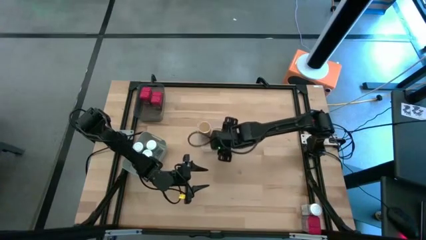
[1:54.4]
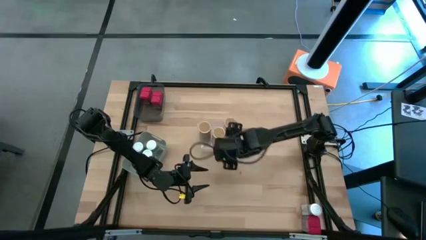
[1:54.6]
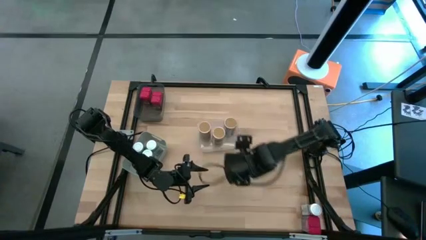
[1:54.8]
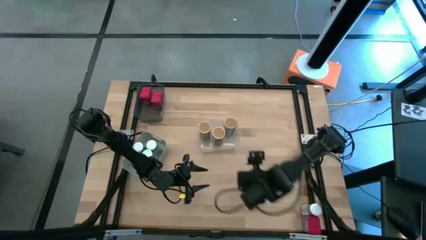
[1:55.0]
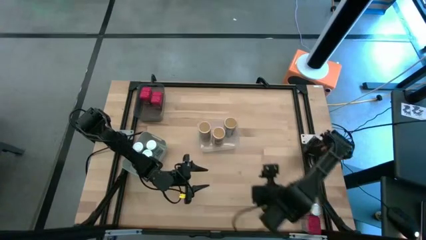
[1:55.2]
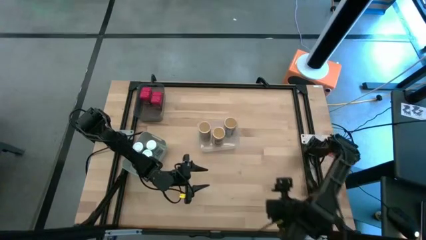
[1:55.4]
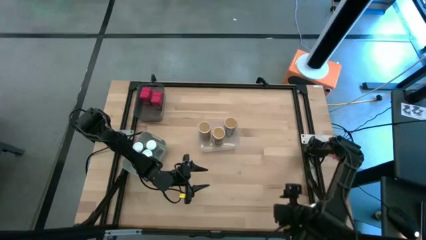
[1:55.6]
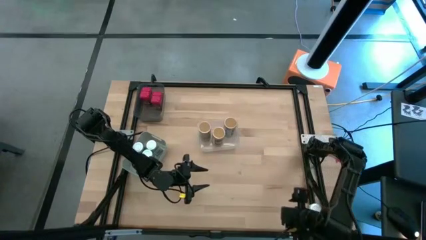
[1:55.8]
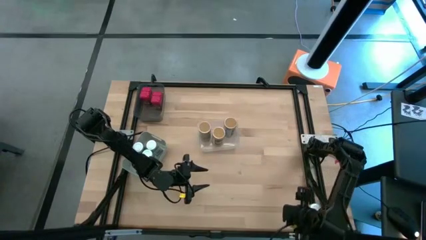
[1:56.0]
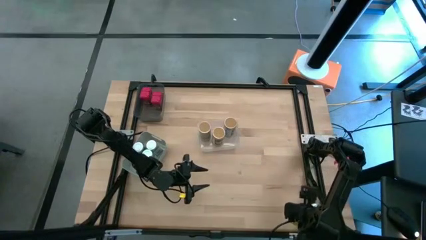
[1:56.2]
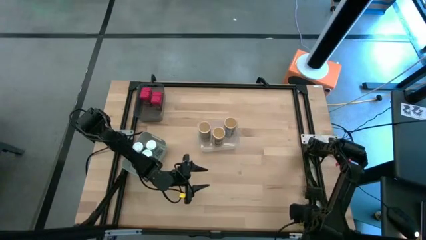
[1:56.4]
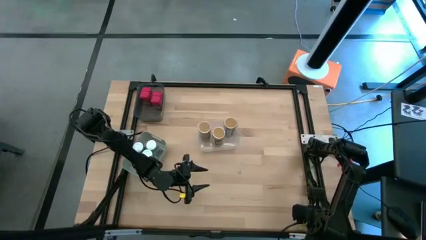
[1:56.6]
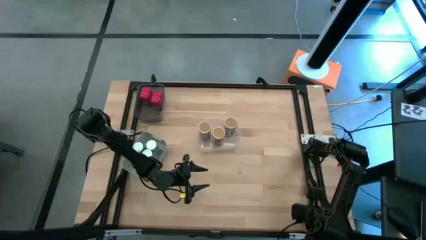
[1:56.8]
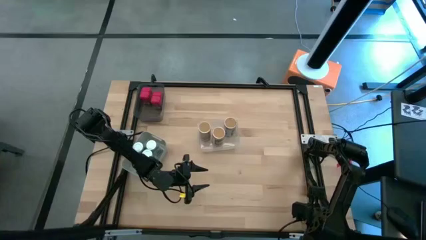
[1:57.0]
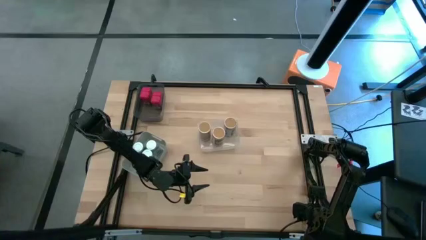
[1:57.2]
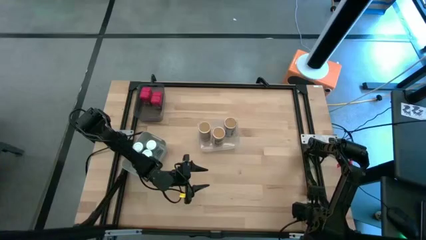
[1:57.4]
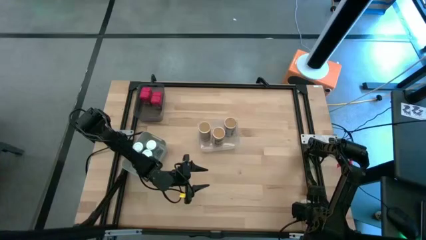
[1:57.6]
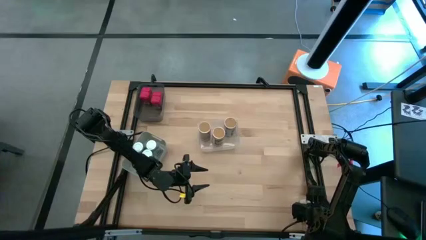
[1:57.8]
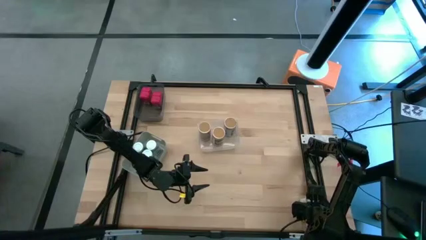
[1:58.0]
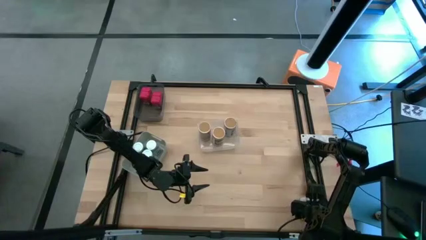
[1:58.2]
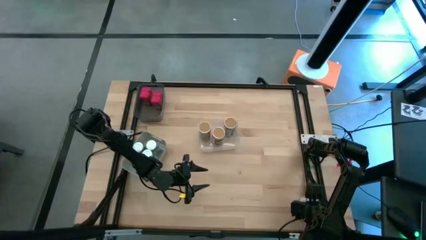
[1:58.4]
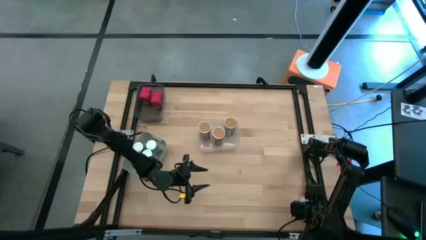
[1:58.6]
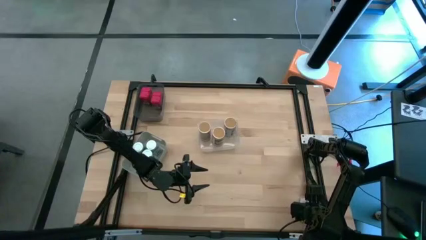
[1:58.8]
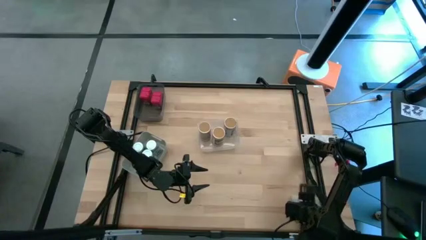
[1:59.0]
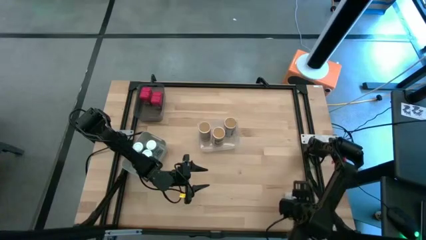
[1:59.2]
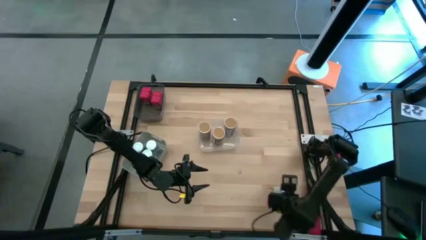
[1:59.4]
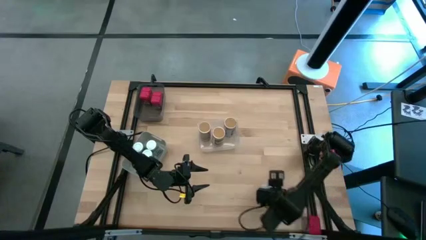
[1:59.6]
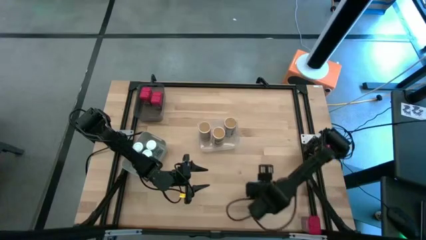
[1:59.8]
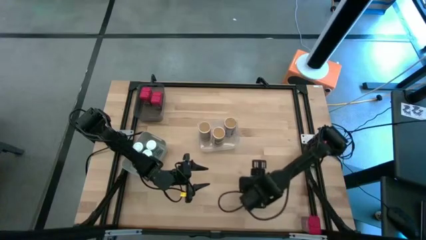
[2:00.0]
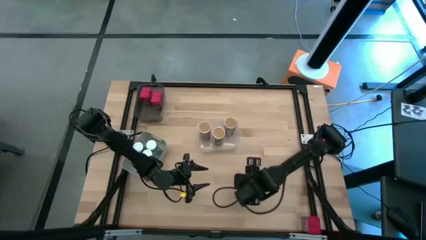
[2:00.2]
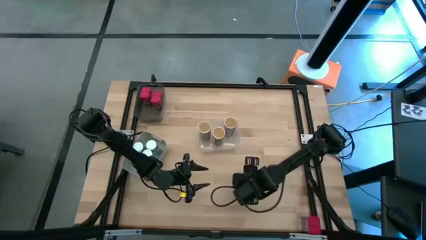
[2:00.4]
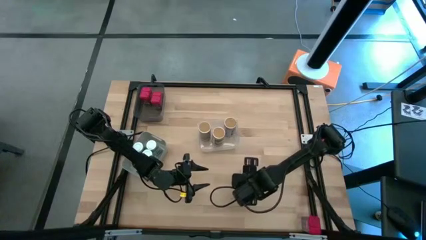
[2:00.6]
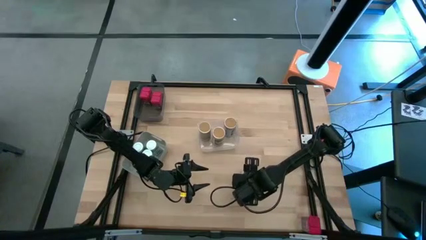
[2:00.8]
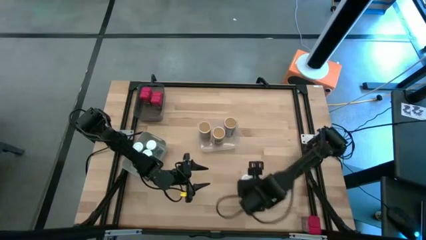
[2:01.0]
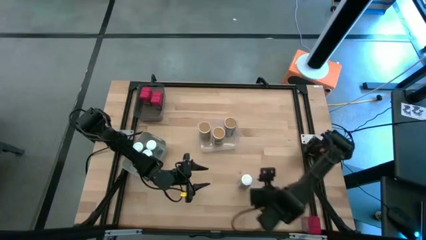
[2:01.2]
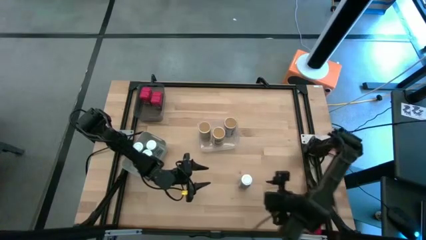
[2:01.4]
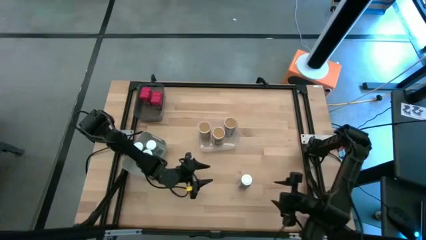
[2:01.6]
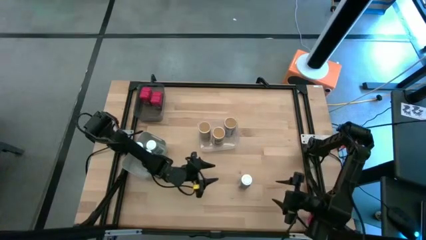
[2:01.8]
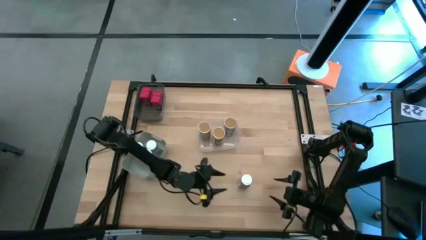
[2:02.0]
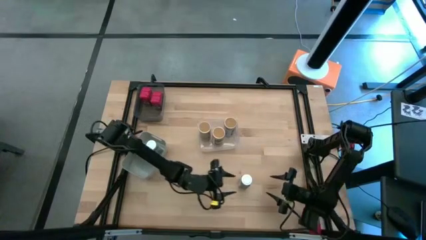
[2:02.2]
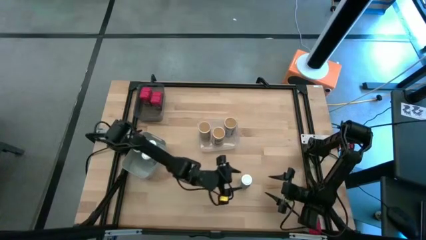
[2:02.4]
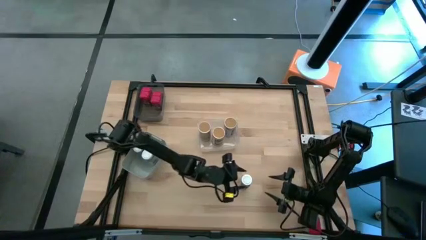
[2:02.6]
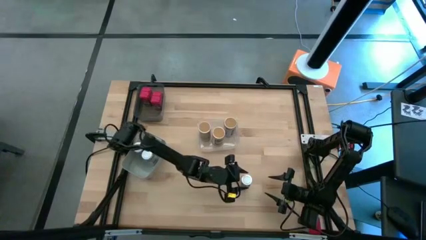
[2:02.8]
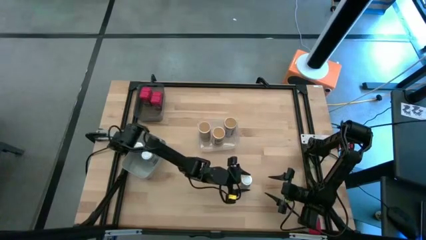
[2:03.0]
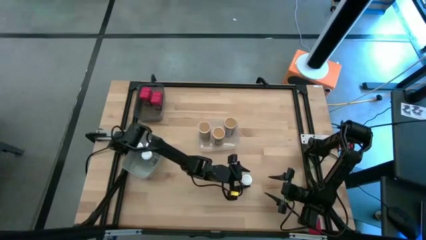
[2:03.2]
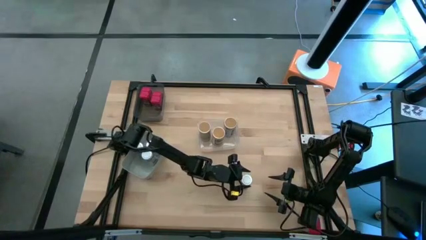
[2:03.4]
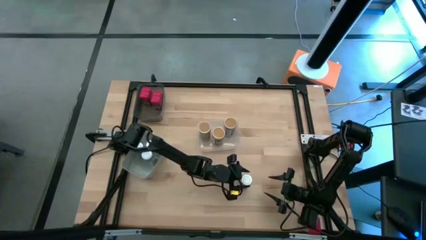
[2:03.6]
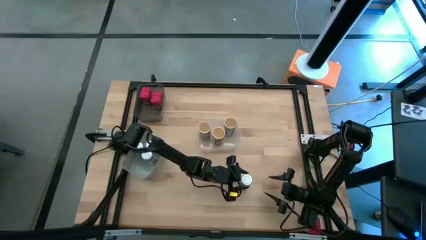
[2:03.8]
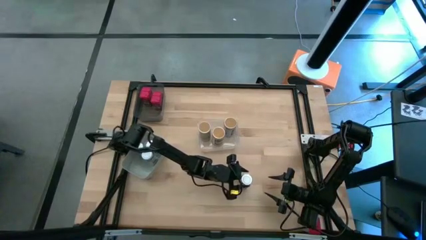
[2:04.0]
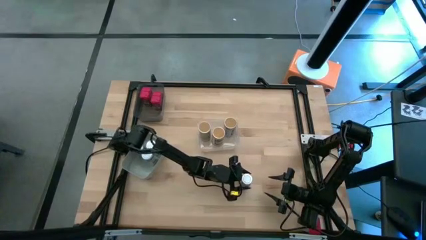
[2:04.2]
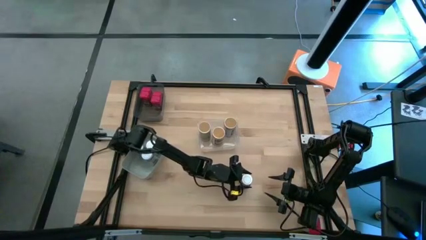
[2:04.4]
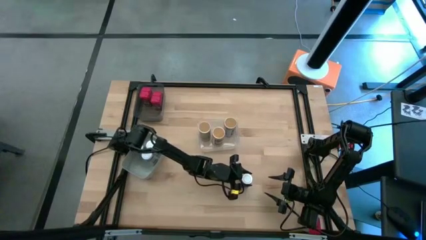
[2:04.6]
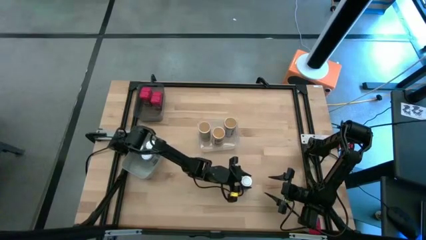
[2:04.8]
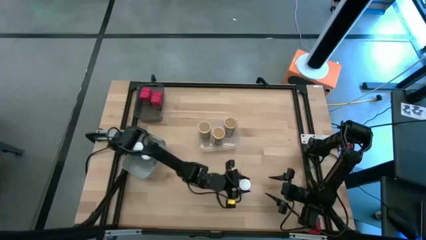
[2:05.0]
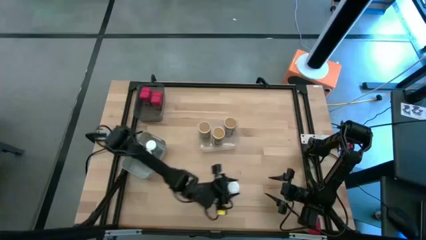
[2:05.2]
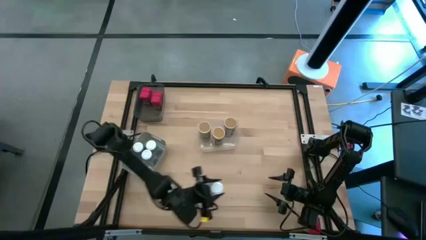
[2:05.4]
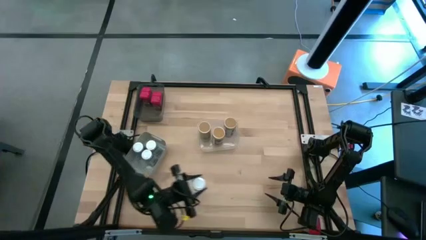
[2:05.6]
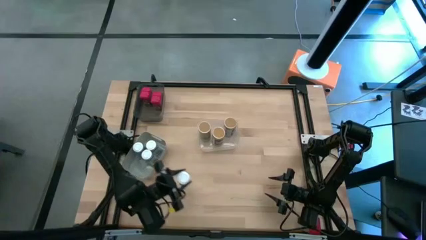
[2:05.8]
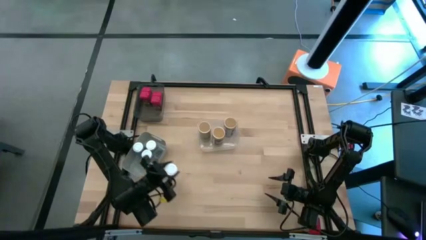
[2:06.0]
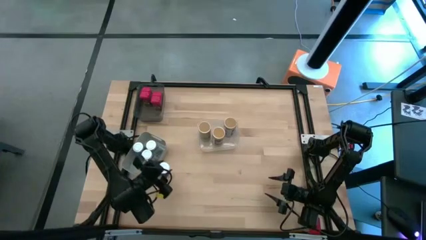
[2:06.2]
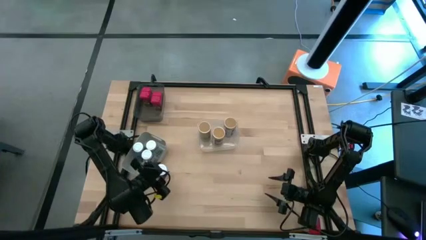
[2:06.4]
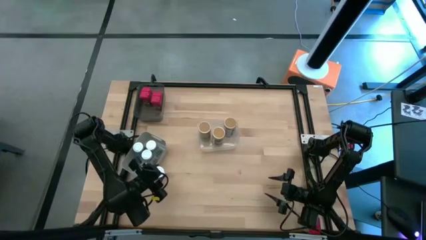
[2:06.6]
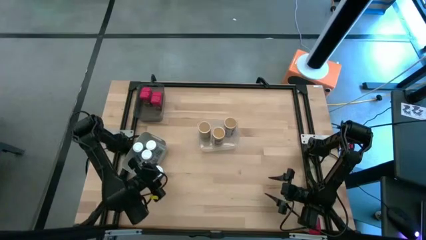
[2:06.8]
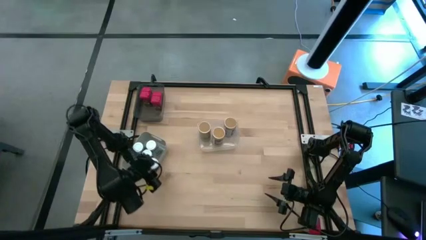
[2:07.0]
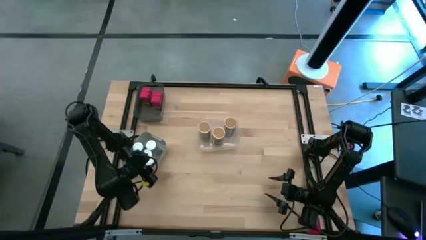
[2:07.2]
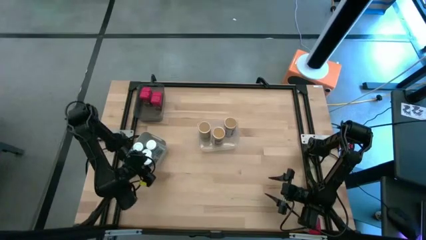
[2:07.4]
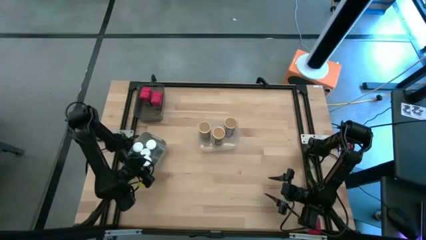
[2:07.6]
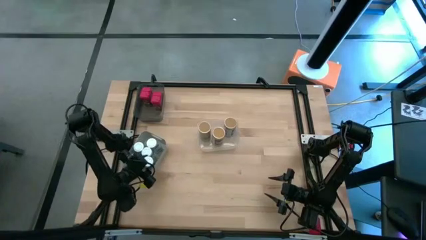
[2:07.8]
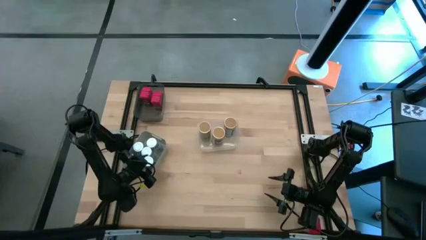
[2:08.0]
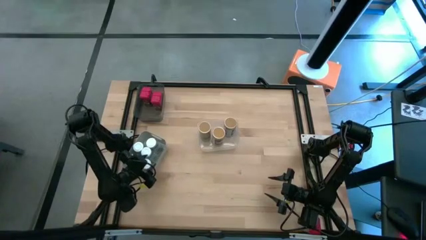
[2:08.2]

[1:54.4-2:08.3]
Task: Sort spices by type
Put the white seasoning bottle into the gray bin

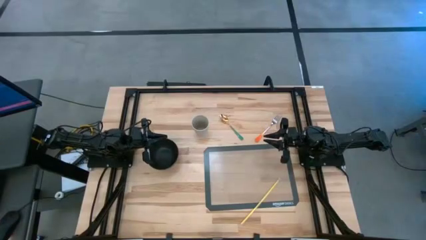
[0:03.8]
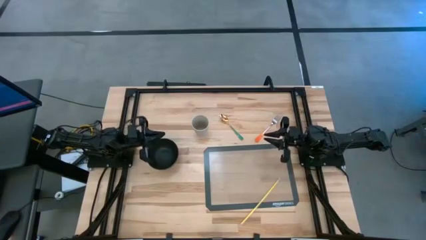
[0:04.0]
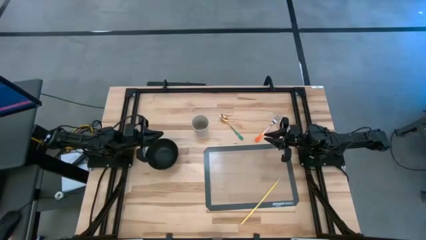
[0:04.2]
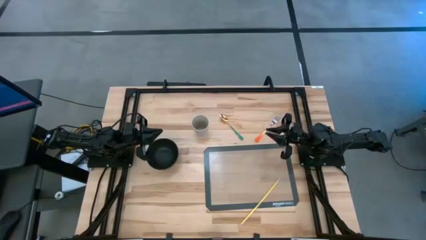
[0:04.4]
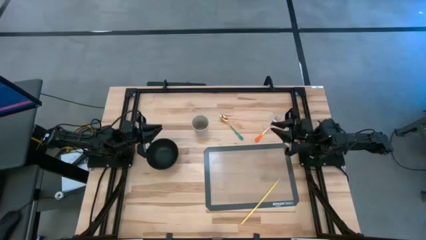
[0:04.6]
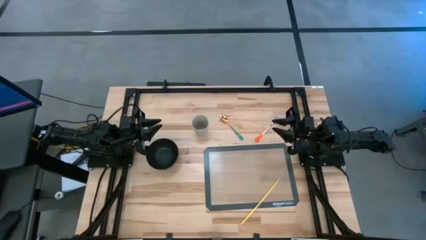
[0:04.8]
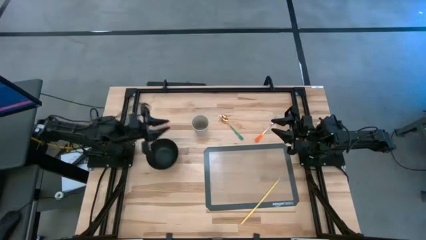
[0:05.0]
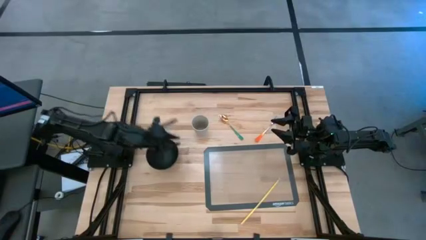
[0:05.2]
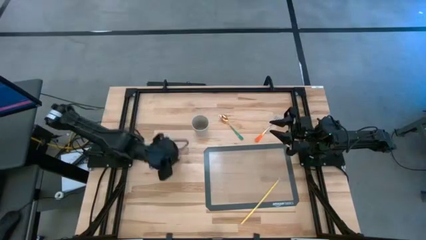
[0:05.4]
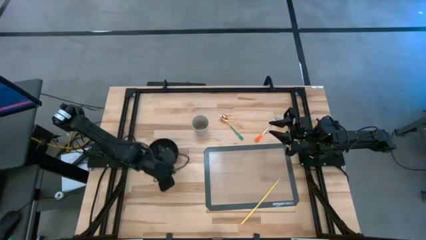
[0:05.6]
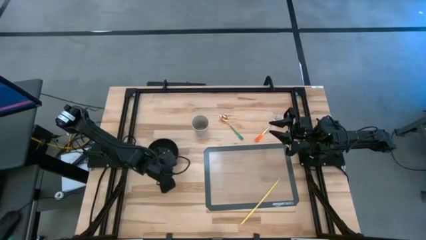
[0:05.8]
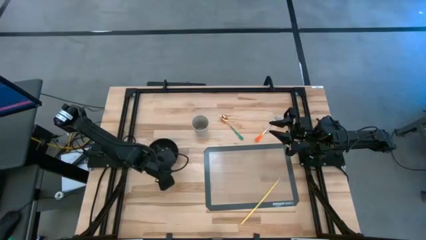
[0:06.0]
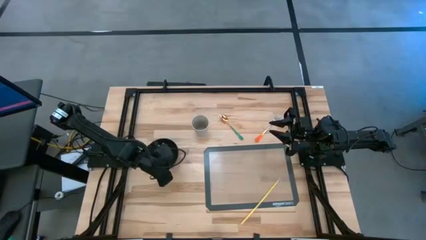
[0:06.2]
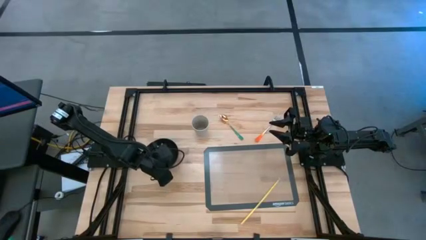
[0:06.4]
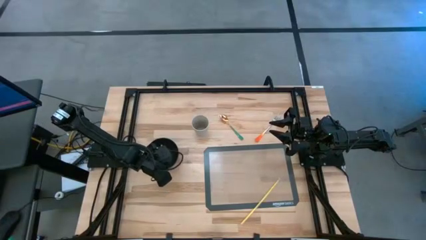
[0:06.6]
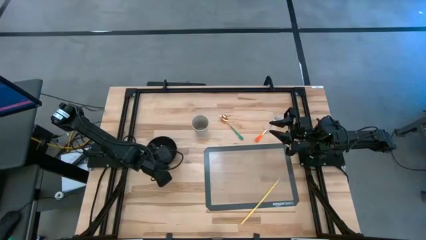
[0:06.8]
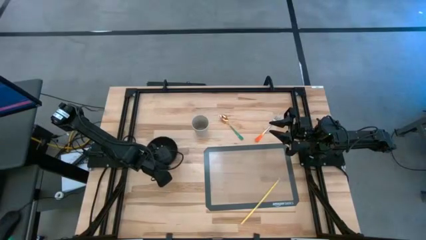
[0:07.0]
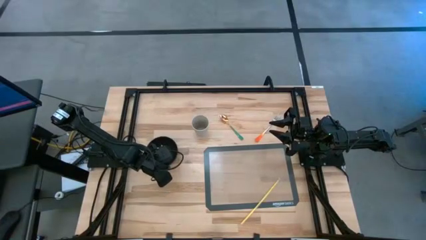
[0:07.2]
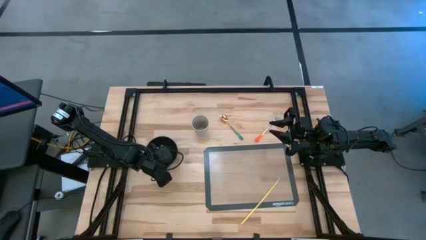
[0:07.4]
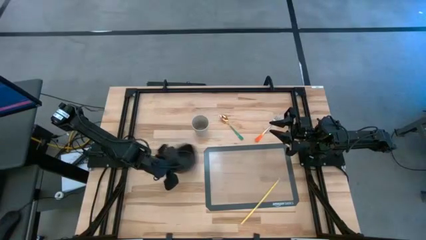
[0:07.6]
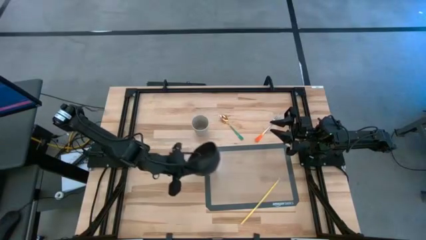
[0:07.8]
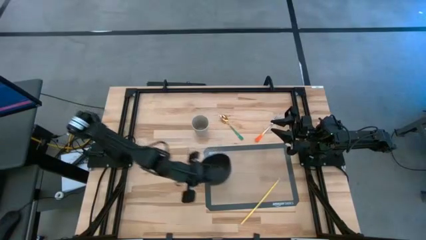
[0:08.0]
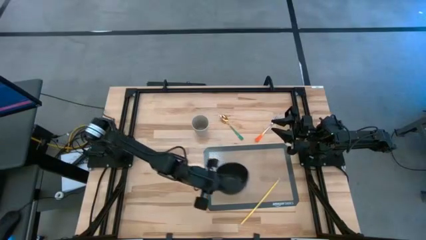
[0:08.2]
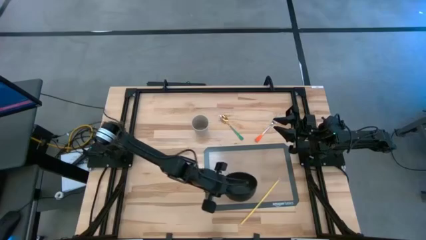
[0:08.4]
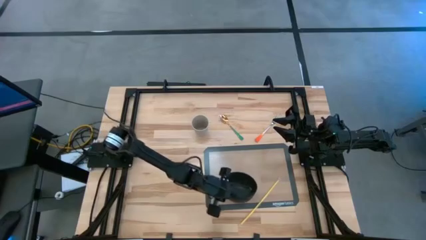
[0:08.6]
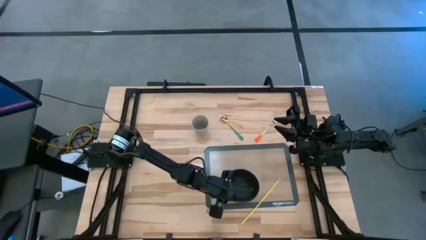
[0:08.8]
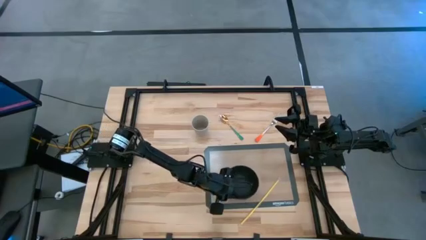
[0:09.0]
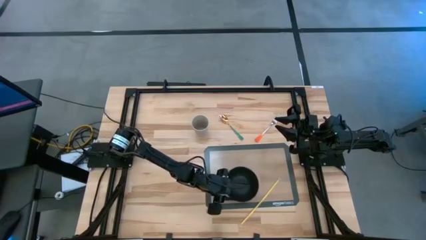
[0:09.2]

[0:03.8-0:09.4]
Task: Pick & Place Utensil
Put the black bowl on the gray mat
